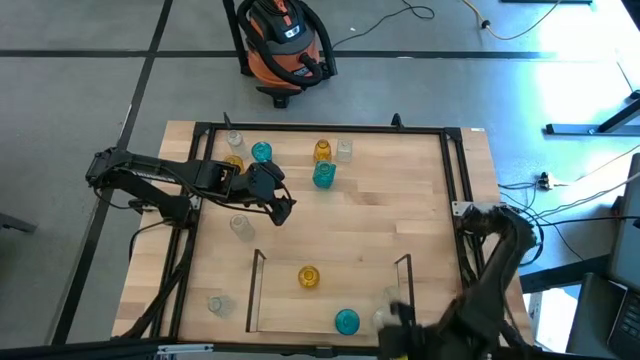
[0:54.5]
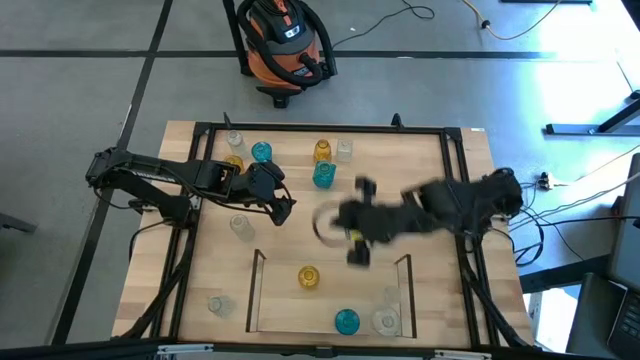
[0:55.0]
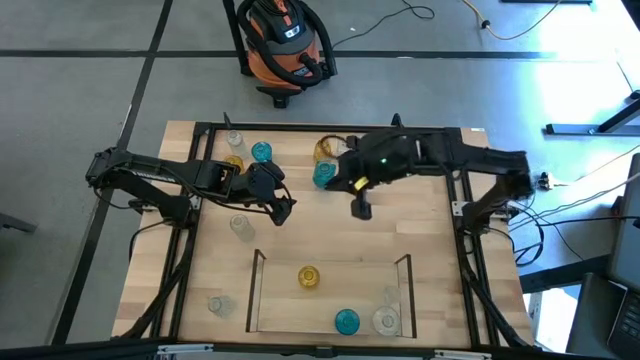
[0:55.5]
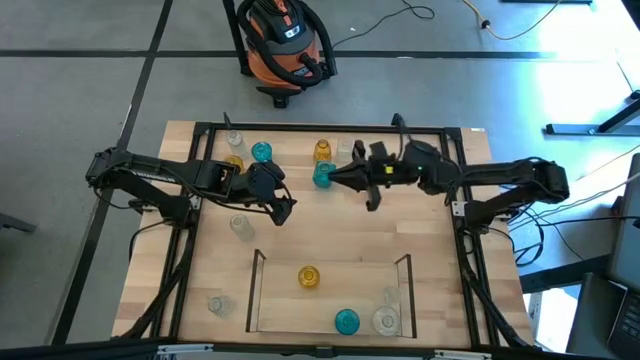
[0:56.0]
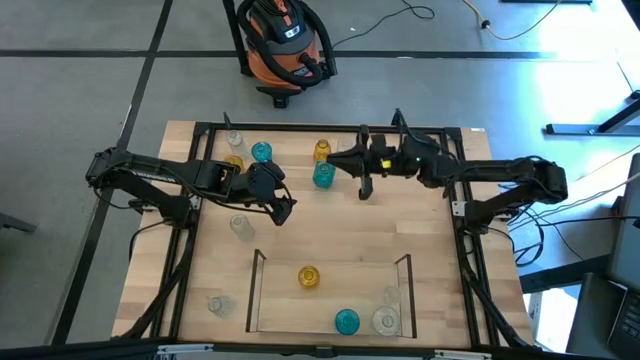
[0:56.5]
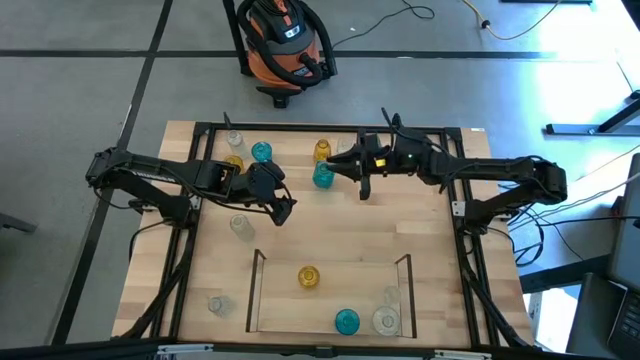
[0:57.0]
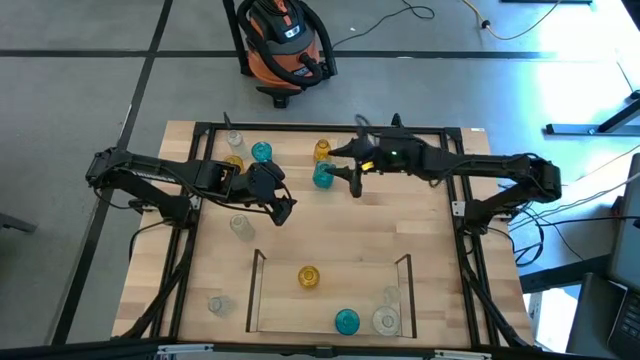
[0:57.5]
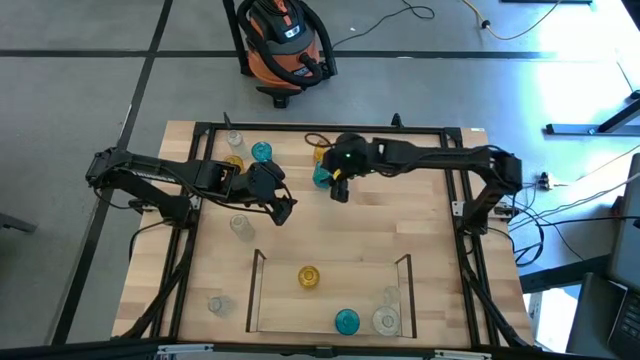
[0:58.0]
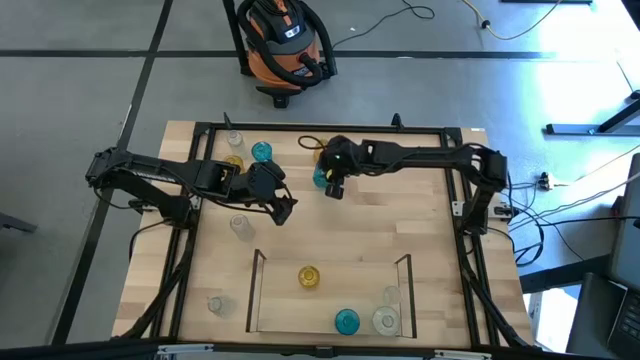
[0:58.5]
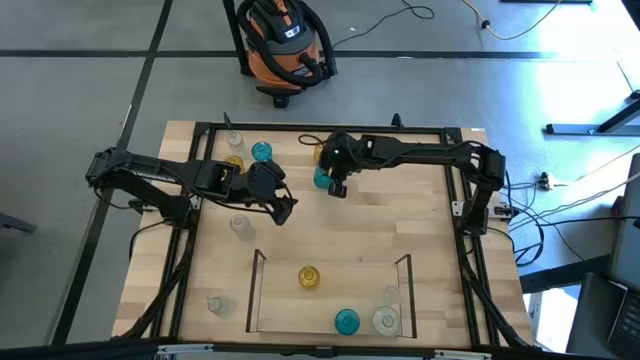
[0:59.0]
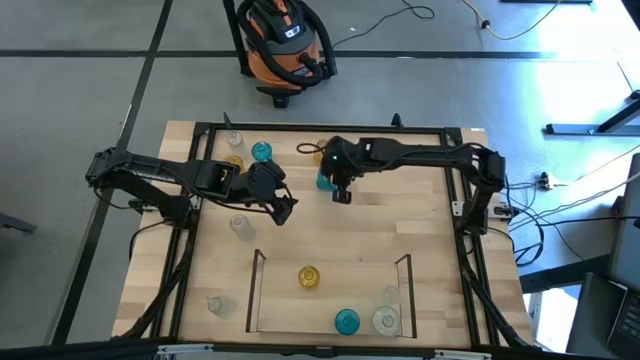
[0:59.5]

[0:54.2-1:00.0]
Task: sort vases onto shelf
Put the blue vase on the shelf aligned with the other blue vase

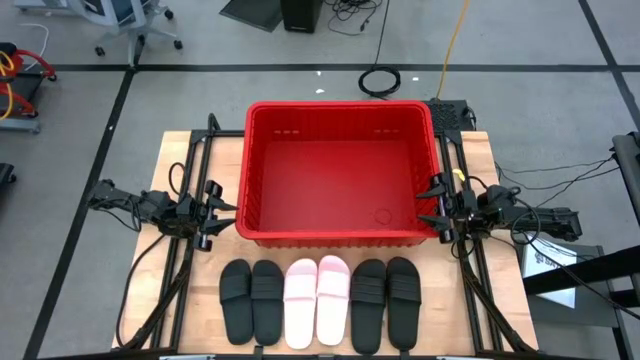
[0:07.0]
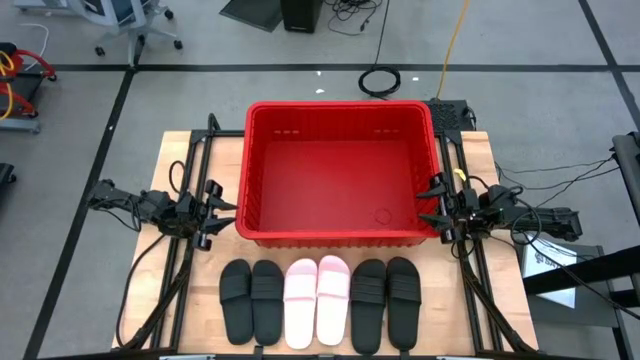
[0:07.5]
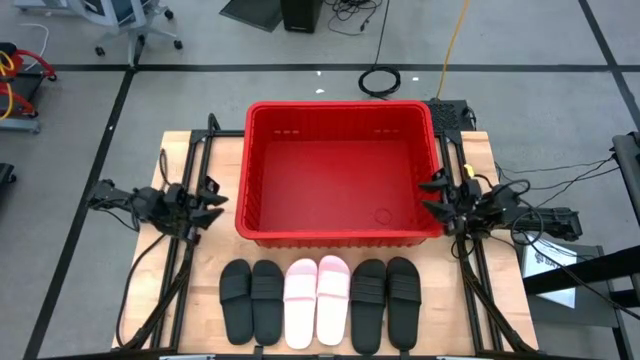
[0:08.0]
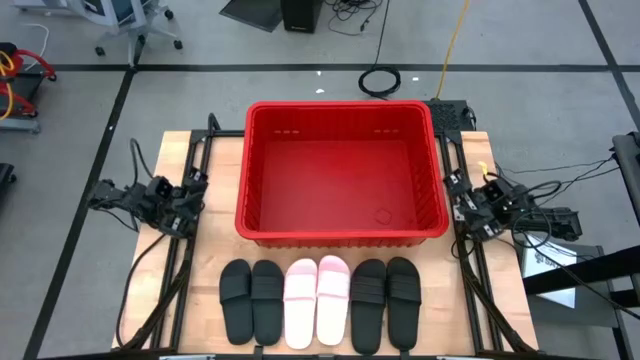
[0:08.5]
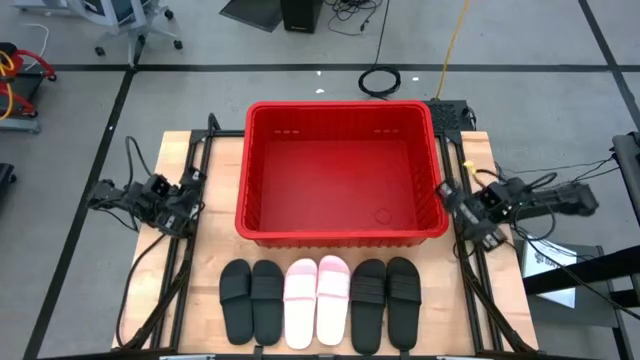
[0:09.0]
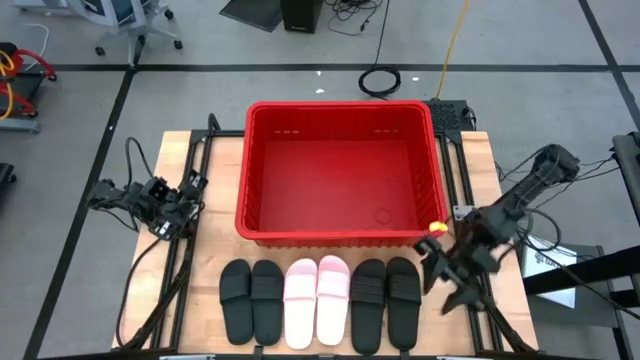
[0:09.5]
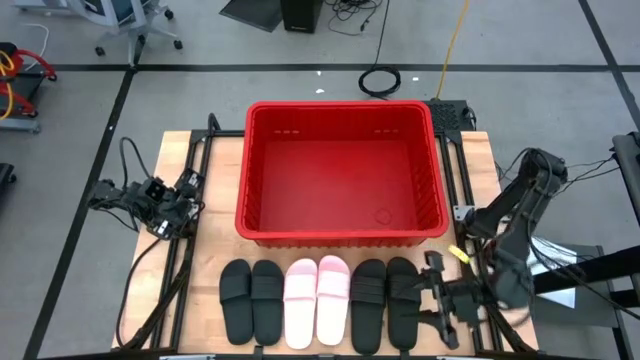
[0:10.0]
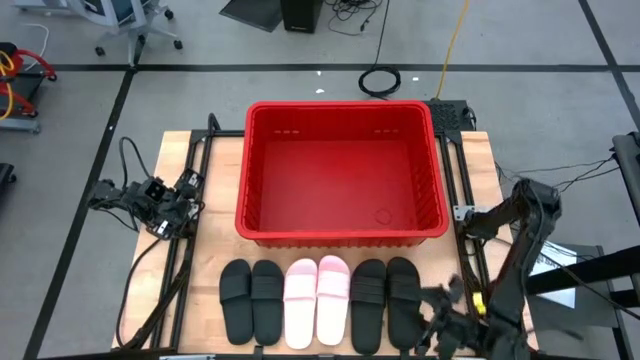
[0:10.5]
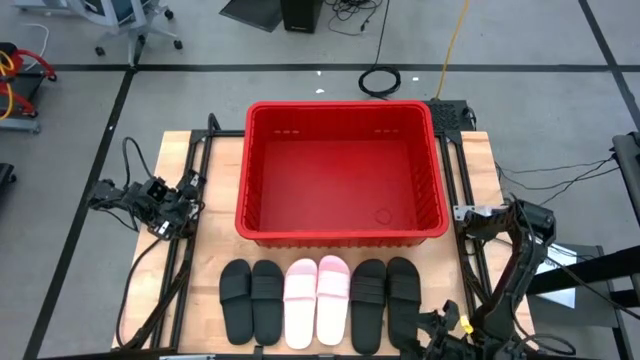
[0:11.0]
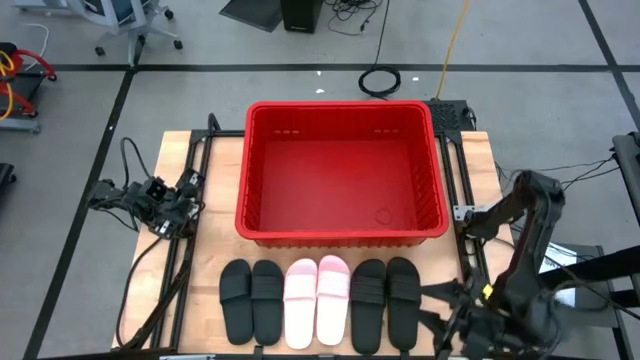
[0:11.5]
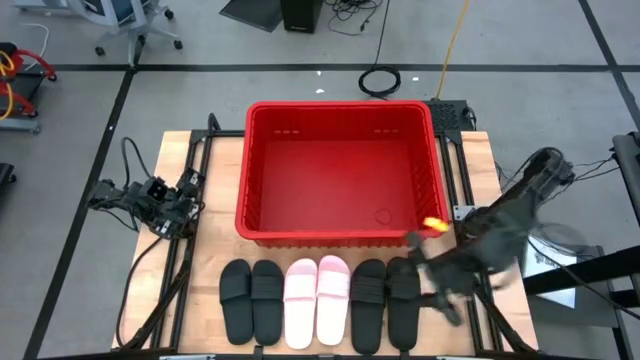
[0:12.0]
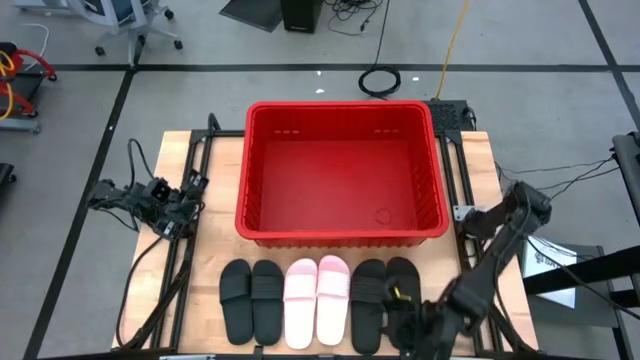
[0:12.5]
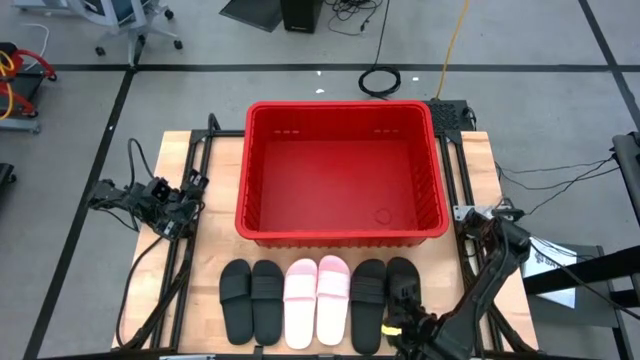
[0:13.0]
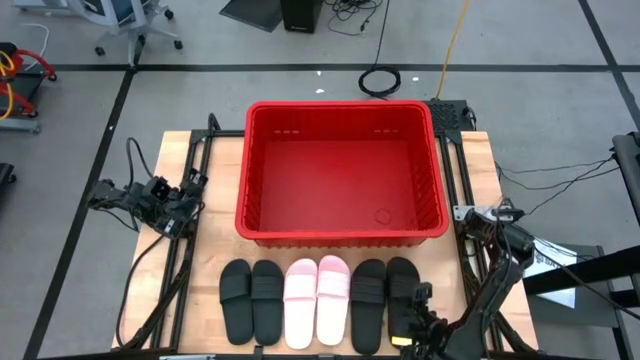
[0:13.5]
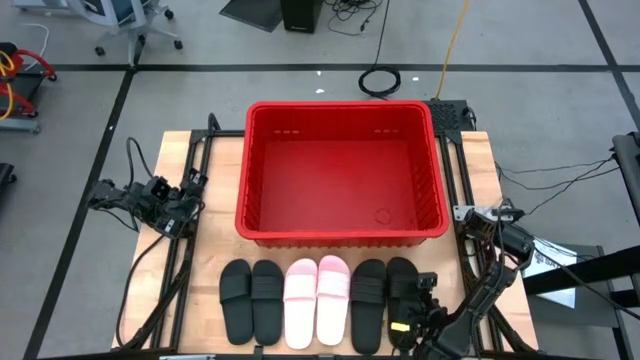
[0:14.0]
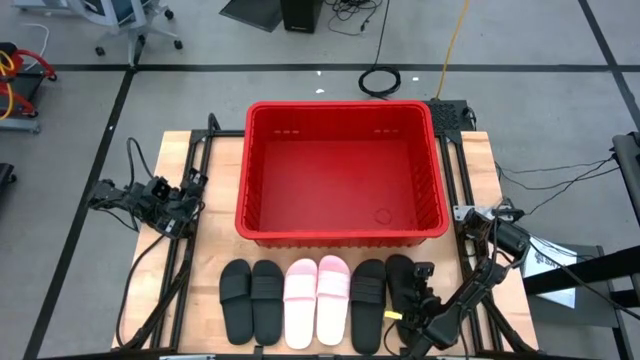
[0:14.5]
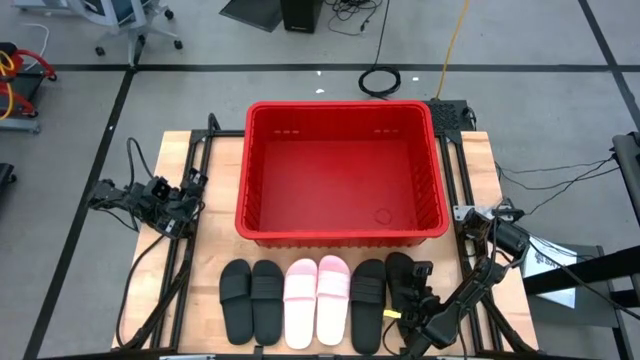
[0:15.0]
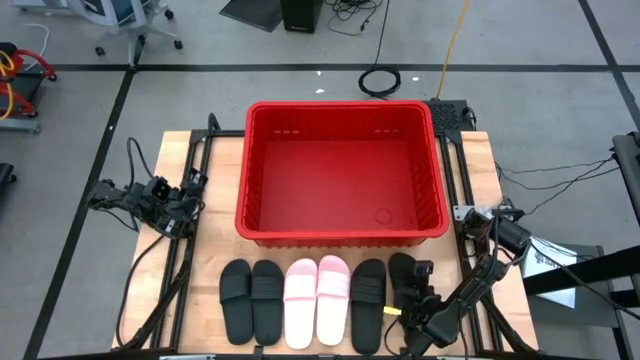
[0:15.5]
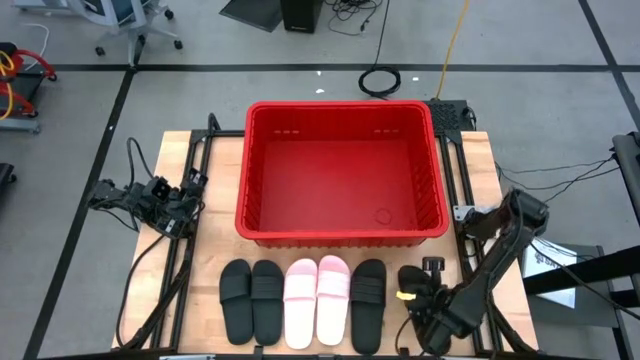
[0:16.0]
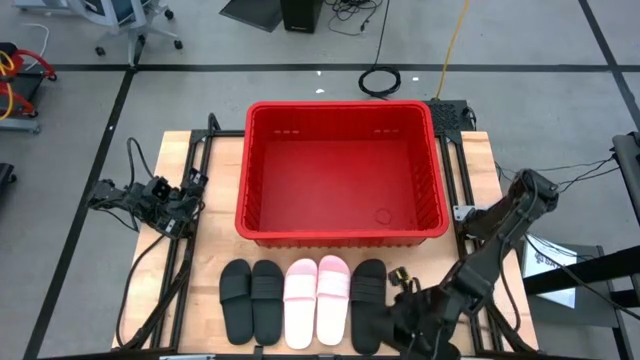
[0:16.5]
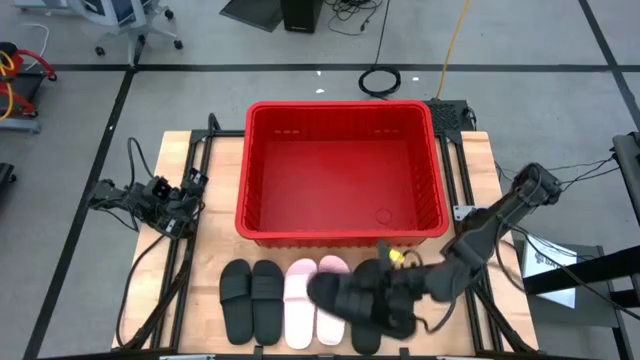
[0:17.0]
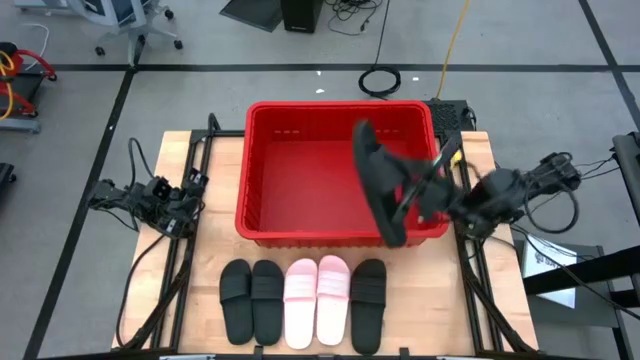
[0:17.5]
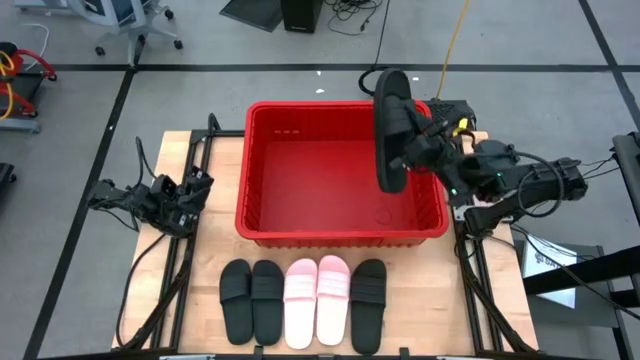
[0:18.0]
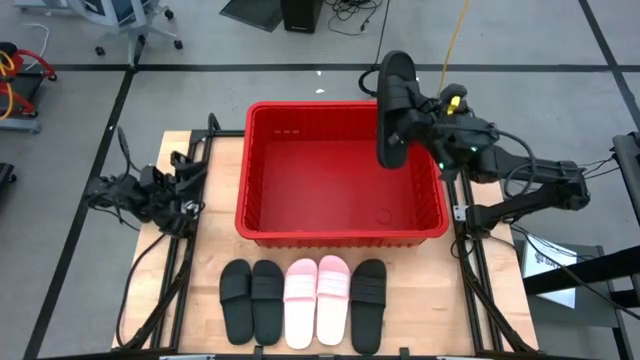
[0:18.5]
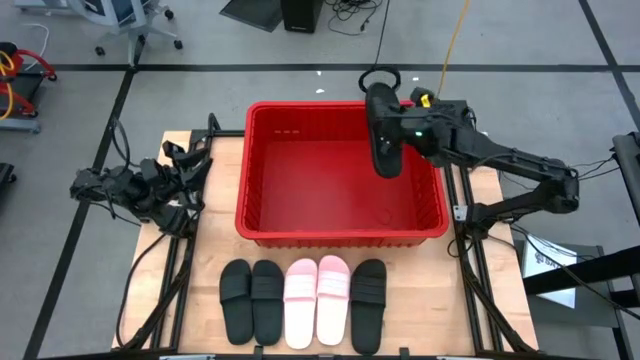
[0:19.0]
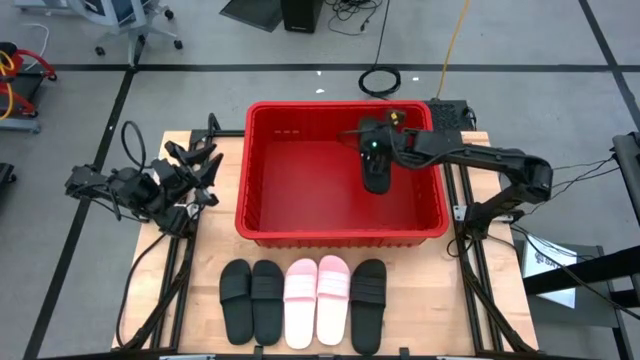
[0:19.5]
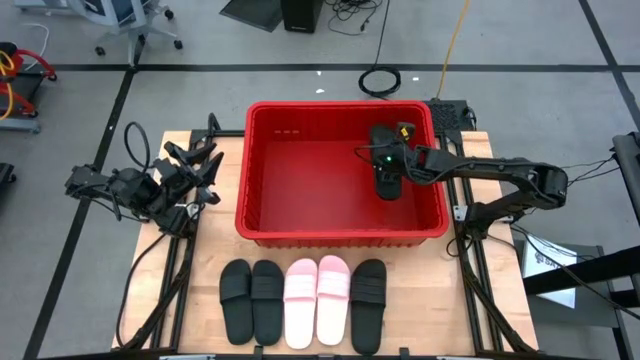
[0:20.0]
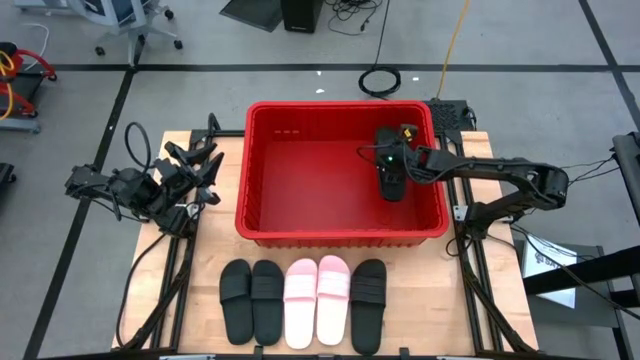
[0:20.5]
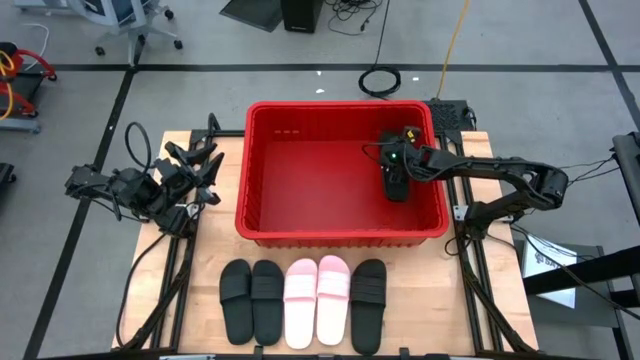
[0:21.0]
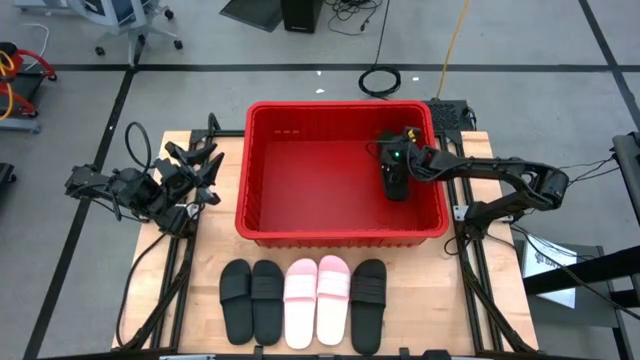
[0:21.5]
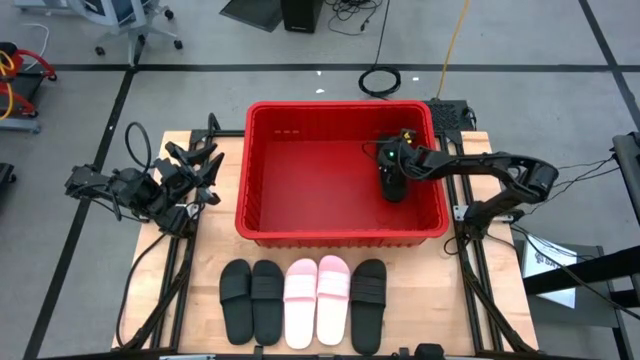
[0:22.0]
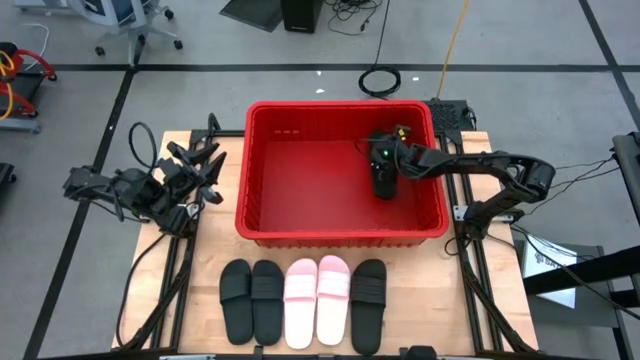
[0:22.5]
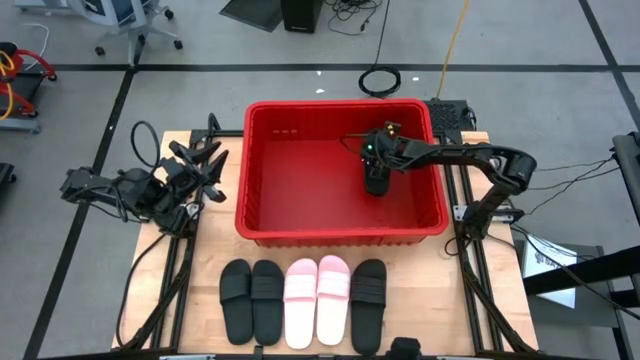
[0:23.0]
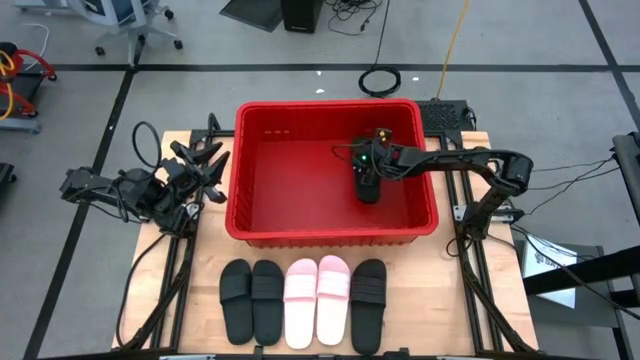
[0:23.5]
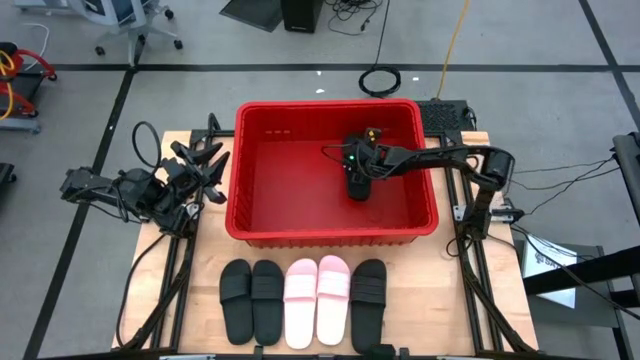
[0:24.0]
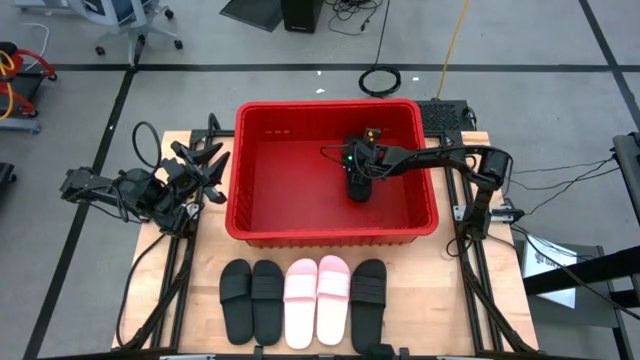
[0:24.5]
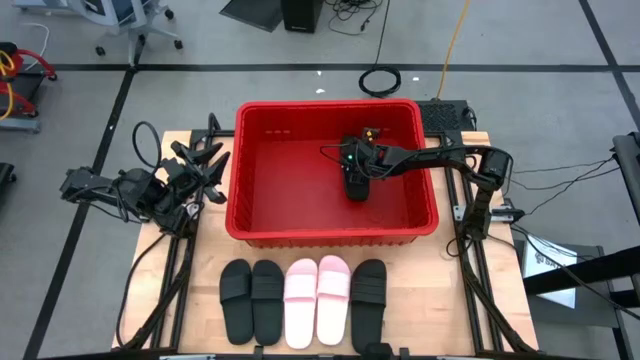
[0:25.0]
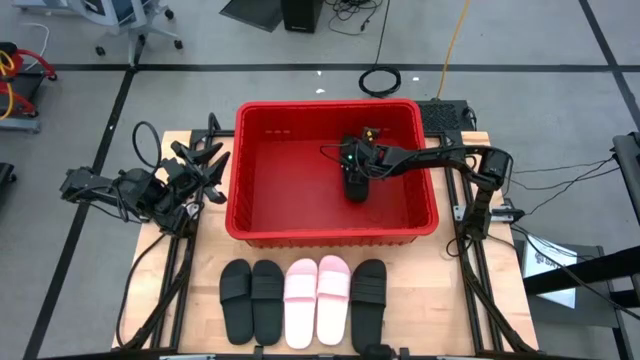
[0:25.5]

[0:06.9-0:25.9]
Task: Pick and place slides into bin
Put the black slide into the red bin
